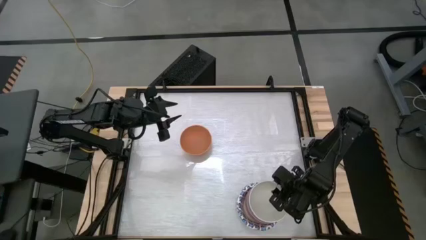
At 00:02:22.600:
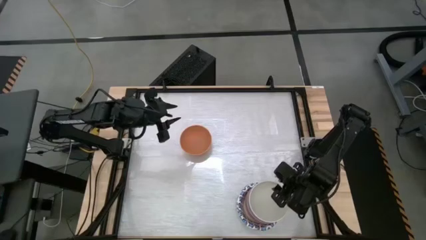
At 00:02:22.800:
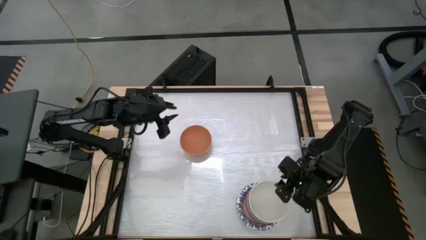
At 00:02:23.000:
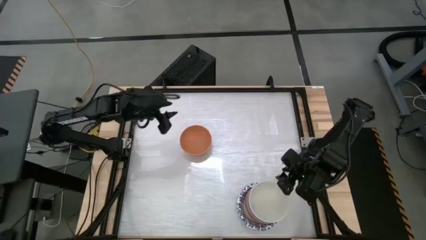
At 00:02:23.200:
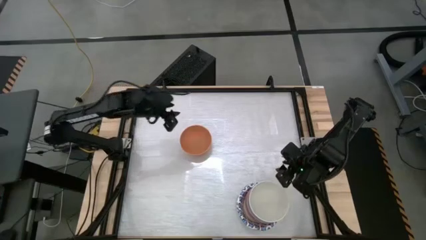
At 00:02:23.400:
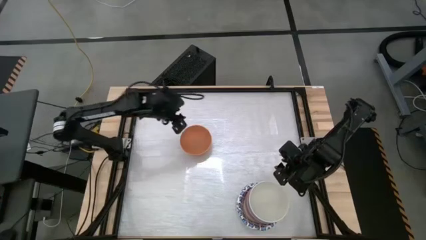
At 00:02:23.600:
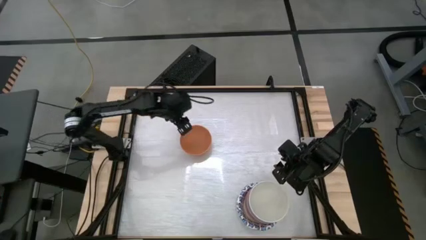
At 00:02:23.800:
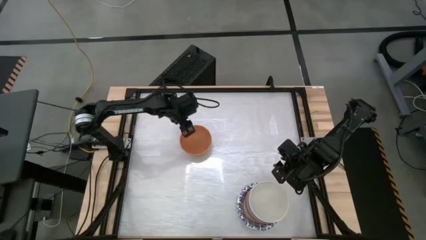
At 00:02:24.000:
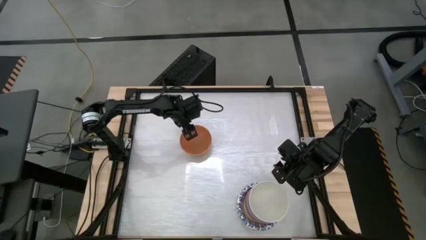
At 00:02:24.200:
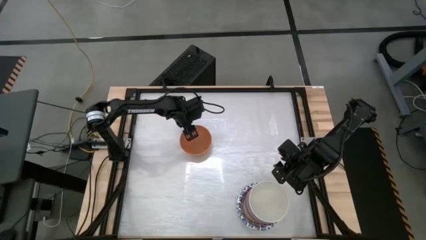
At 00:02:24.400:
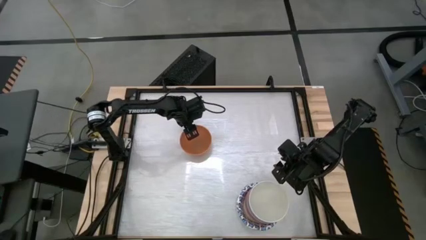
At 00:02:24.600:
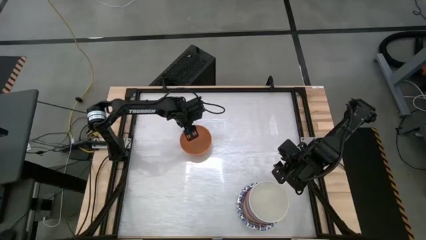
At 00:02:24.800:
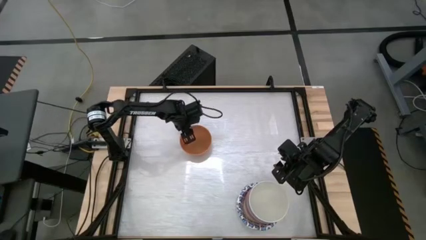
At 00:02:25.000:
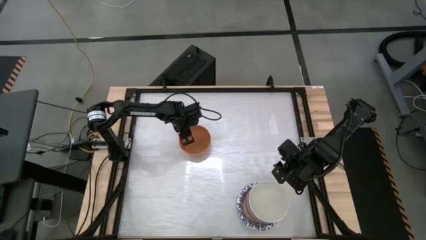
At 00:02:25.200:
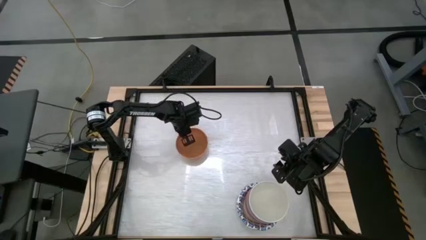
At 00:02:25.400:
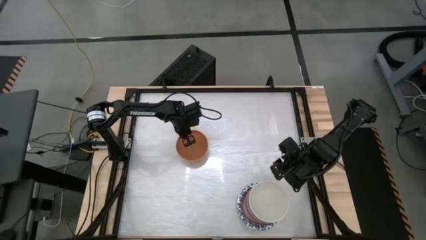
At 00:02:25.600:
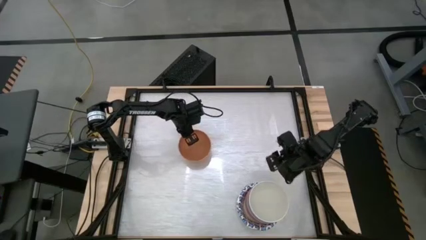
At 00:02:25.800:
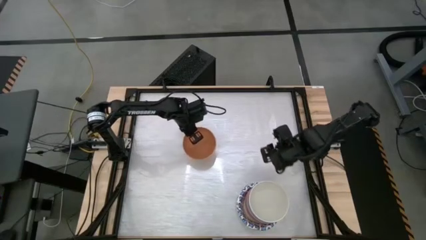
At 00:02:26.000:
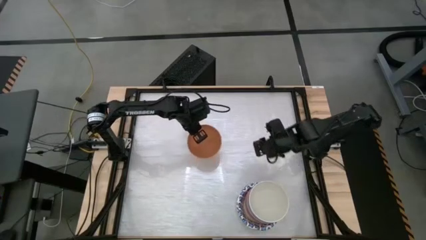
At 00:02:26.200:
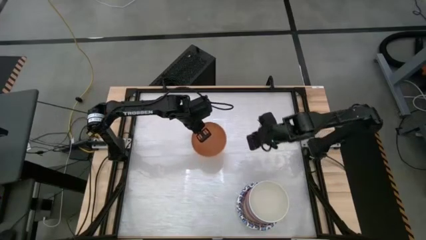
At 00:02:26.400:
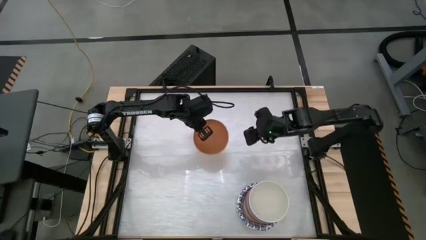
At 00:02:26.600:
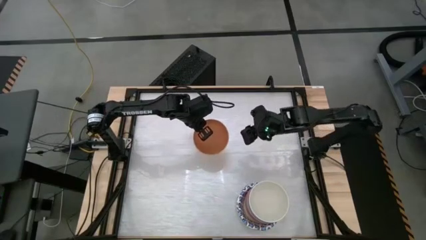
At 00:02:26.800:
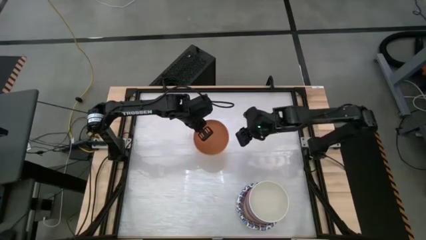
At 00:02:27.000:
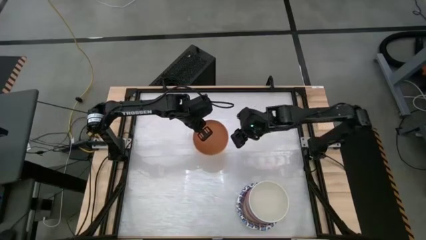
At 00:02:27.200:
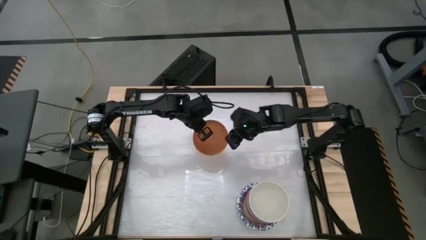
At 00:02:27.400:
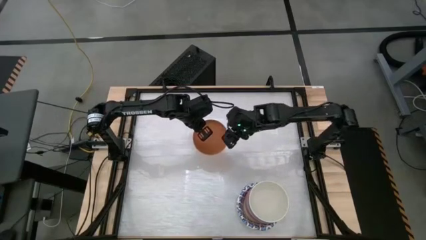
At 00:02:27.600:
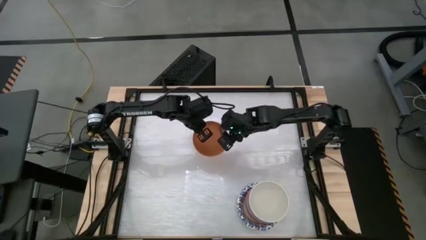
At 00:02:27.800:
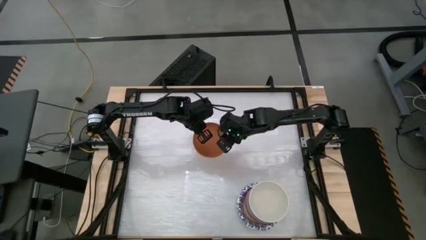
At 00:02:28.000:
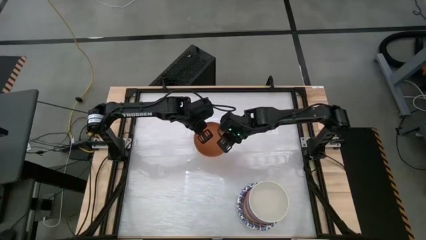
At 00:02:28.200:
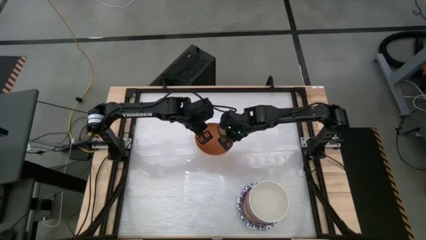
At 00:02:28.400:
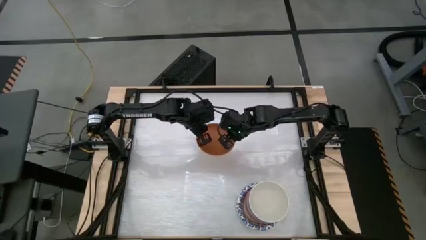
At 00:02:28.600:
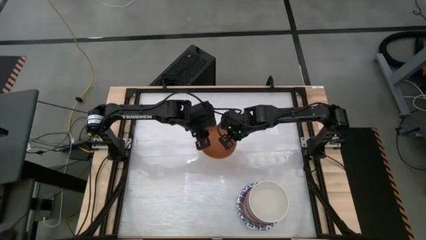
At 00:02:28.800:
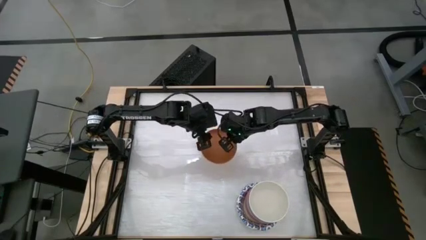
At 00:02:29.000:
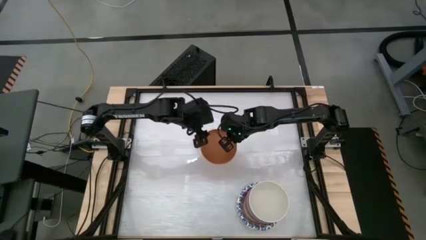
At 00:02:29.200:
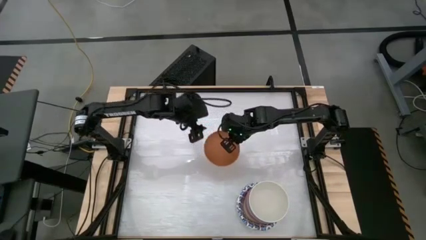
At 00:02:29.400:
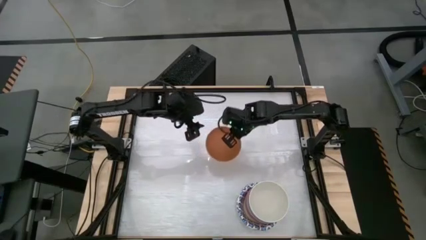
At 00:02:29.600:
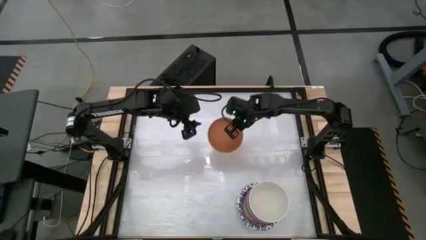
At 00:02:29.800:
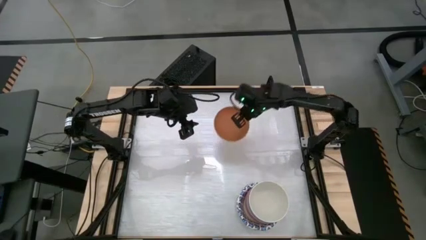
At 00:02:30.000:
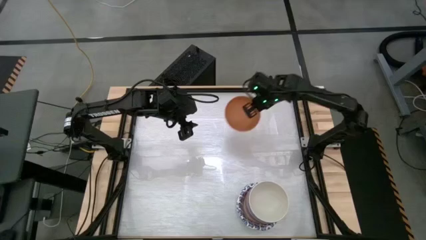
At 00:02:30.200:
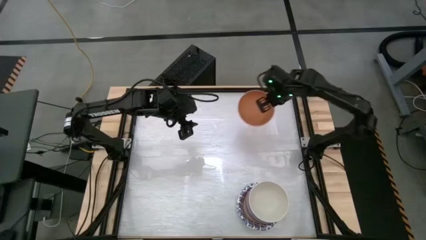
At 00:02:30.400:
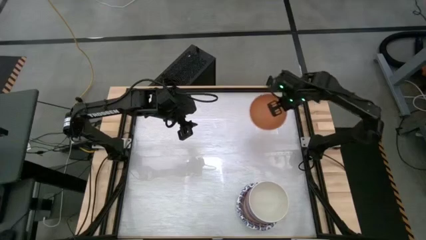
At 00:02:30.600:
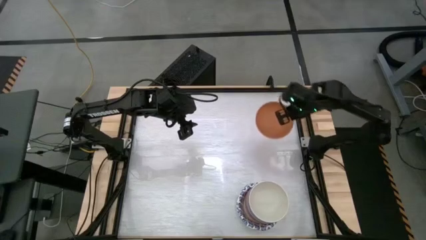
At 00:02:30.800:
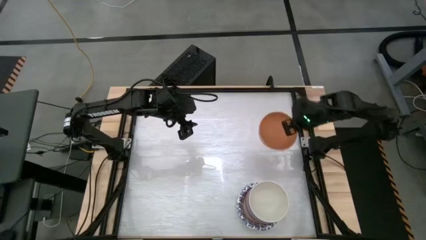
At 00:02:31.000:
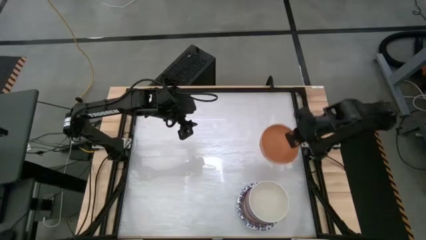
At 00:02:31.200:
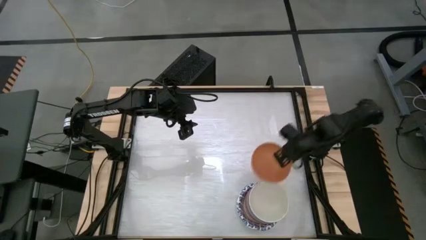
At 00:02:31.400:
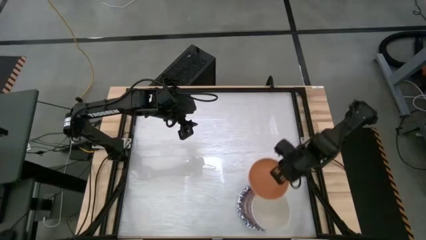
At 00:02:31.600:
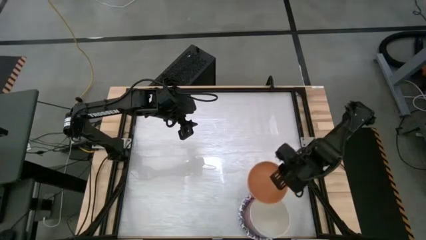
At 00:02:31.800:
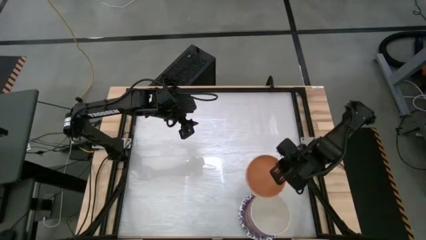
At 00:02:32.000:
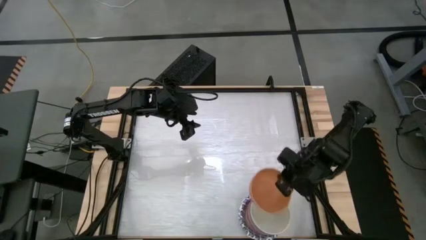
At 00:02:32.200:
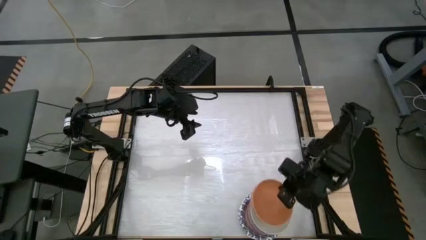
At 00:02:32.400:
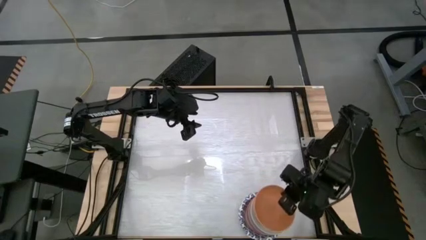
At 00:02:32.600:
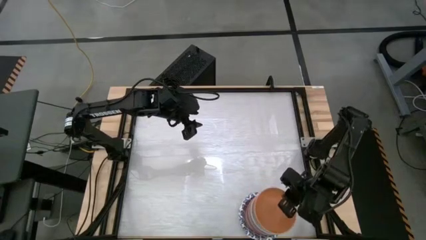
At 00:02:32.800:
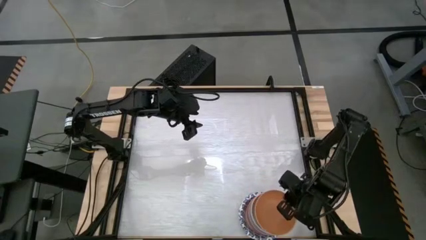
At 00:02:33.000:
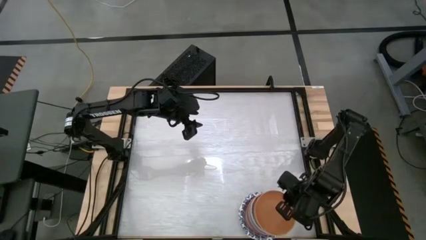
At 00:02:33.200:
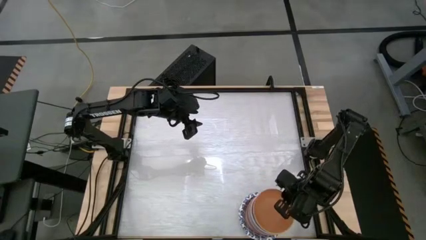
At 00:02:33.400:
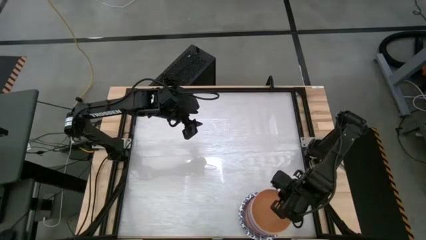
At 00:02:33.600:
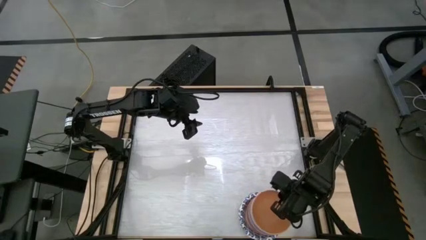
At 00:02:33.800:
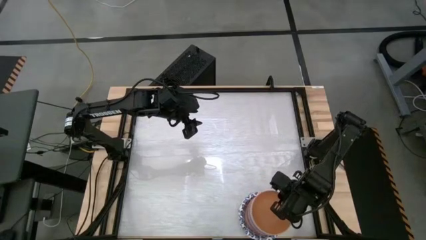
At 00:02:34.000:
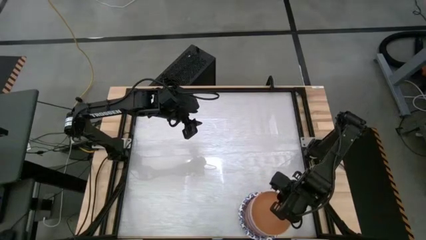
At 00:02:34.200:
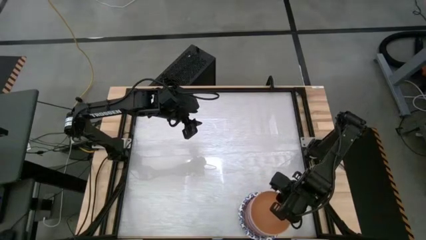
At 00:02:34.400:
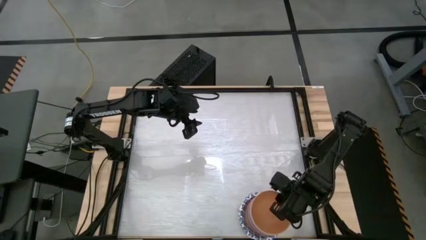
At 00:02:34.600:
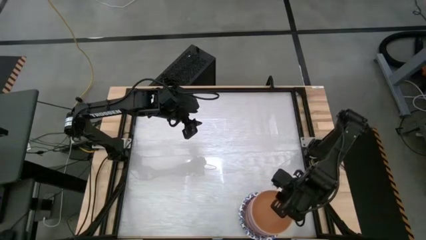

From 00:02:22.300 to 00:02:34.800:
Stack the light orange bowl on top of the other white bowl
